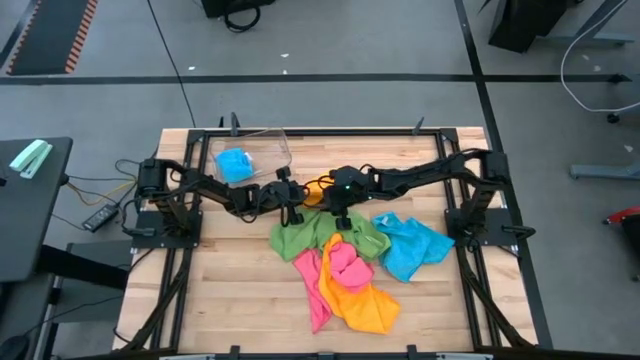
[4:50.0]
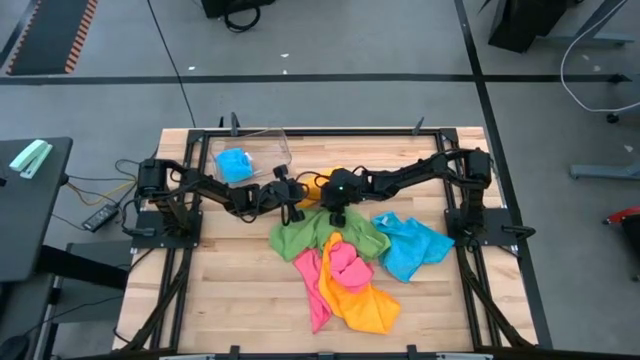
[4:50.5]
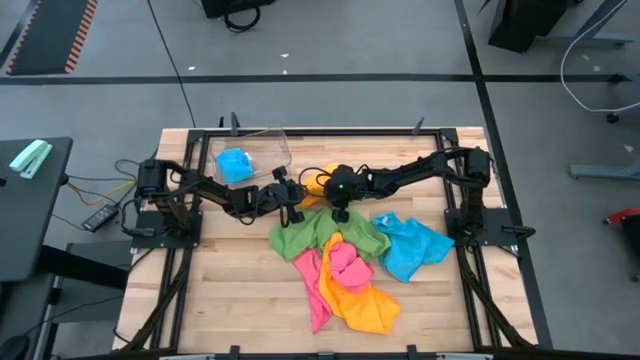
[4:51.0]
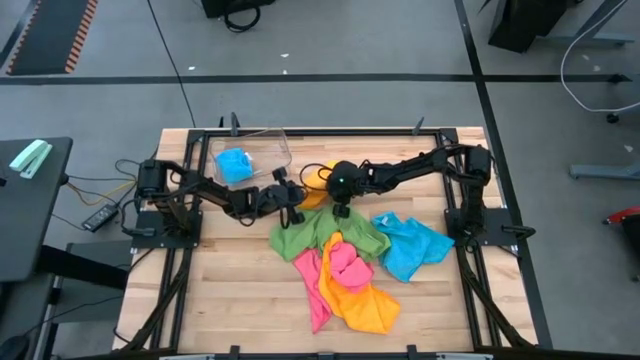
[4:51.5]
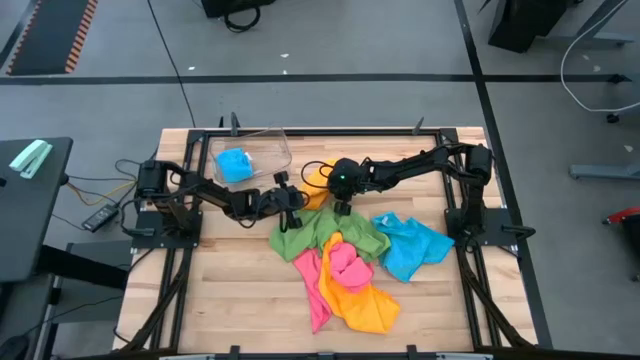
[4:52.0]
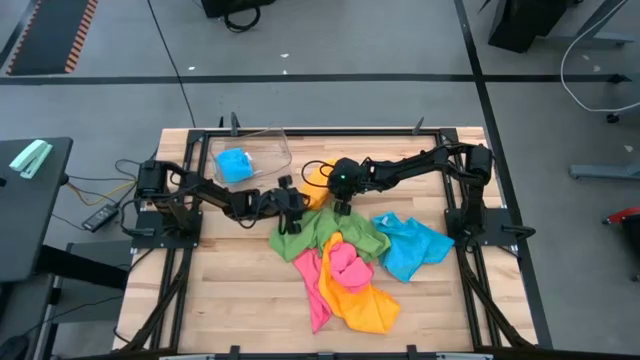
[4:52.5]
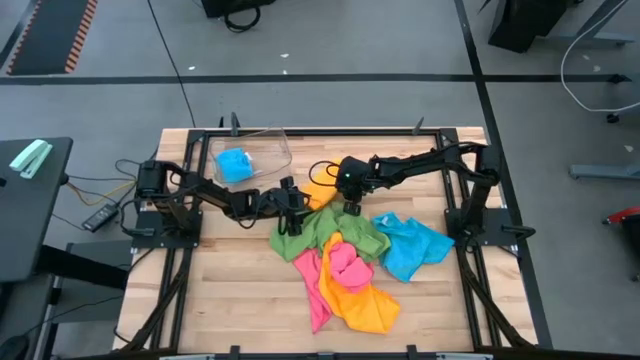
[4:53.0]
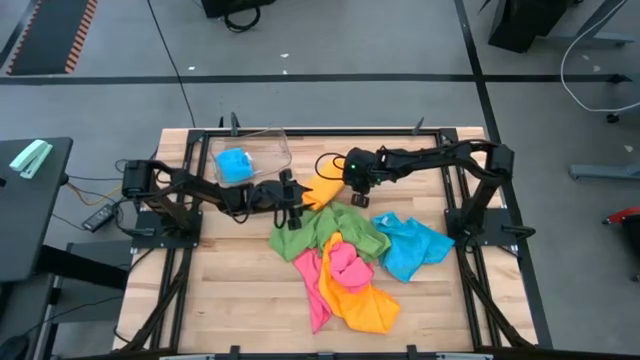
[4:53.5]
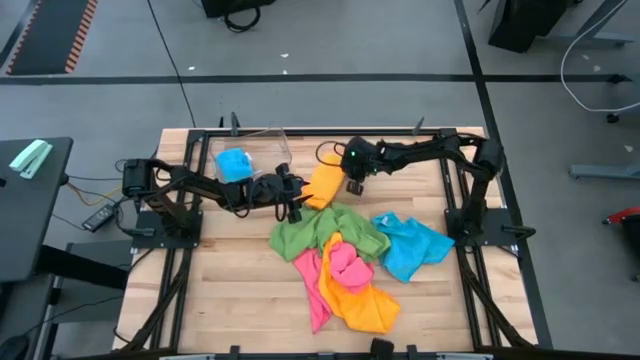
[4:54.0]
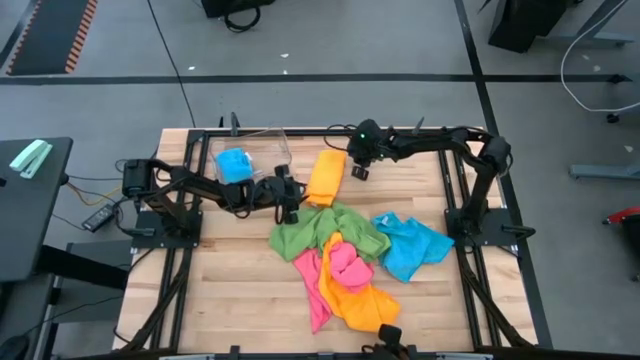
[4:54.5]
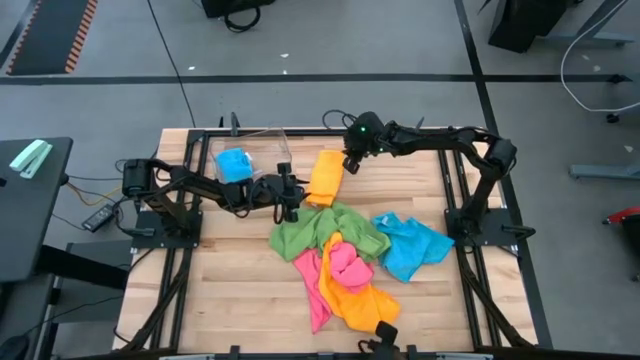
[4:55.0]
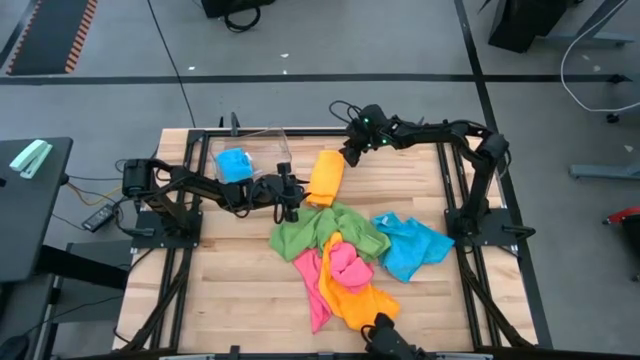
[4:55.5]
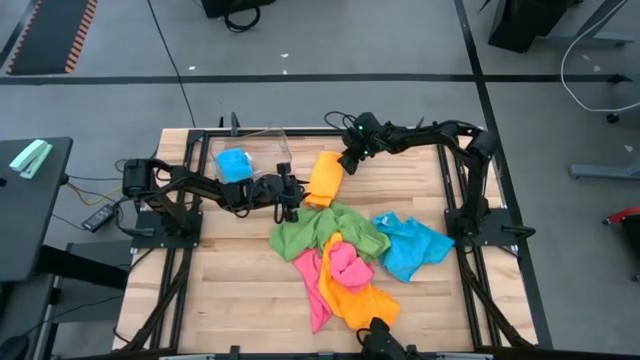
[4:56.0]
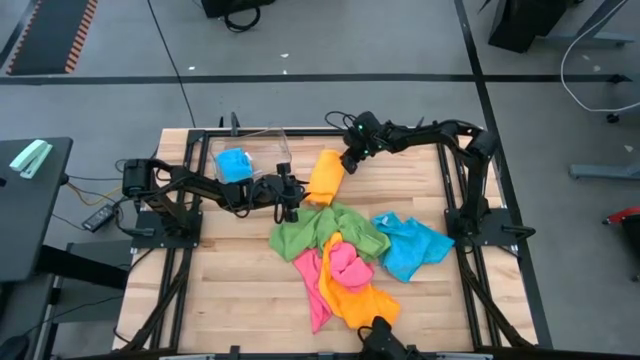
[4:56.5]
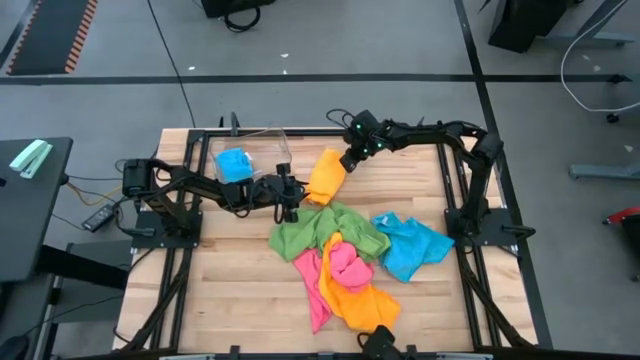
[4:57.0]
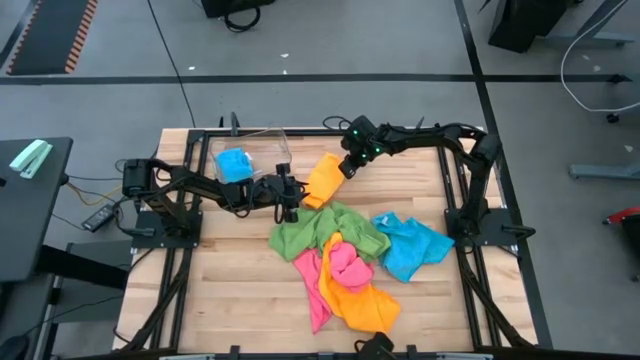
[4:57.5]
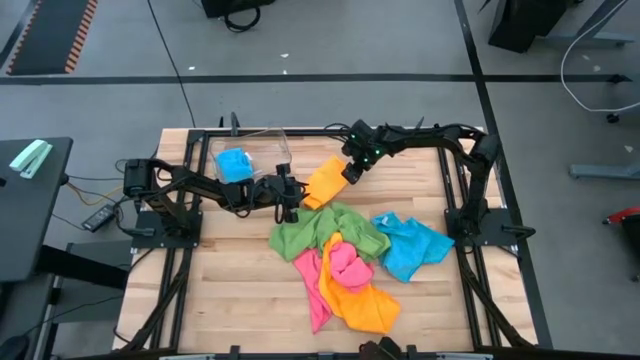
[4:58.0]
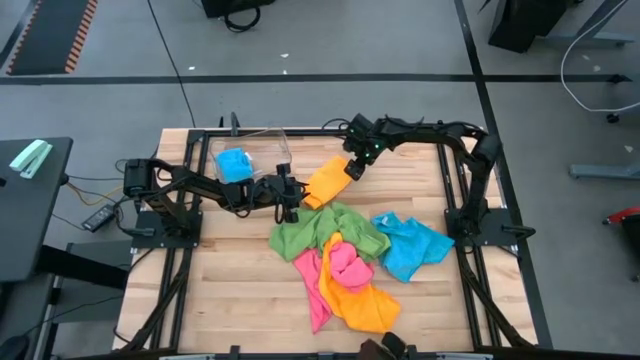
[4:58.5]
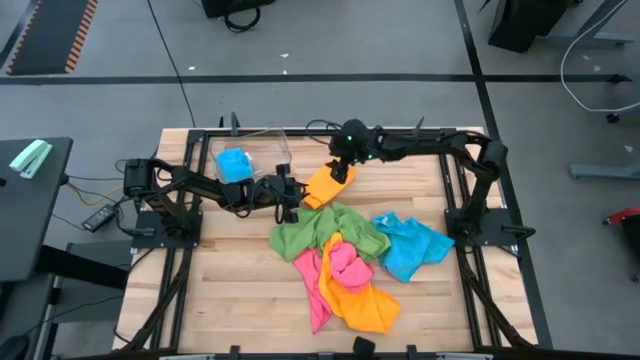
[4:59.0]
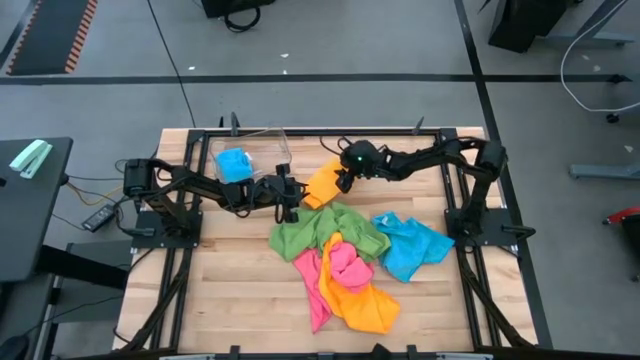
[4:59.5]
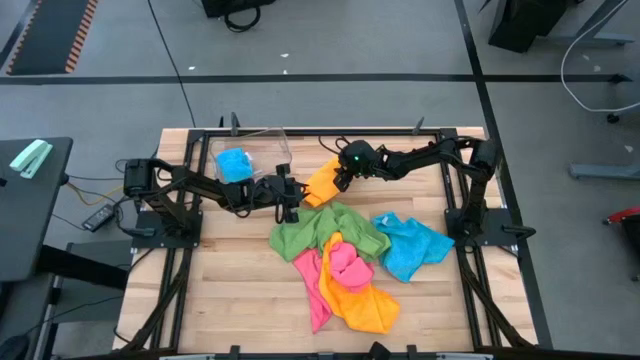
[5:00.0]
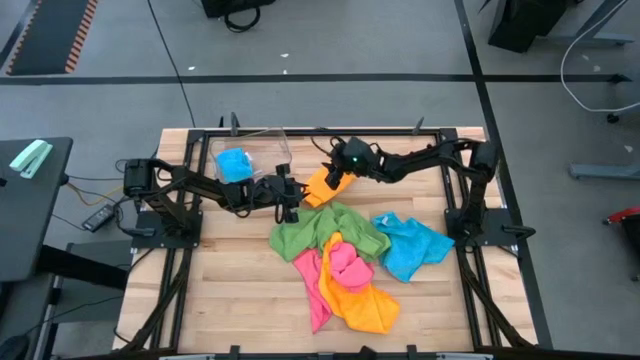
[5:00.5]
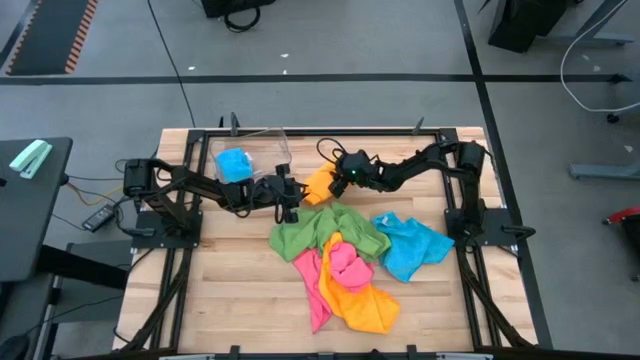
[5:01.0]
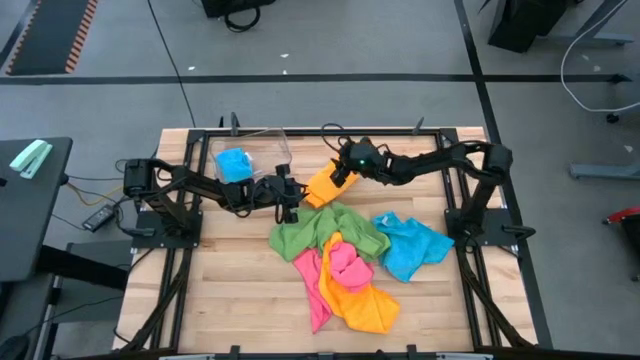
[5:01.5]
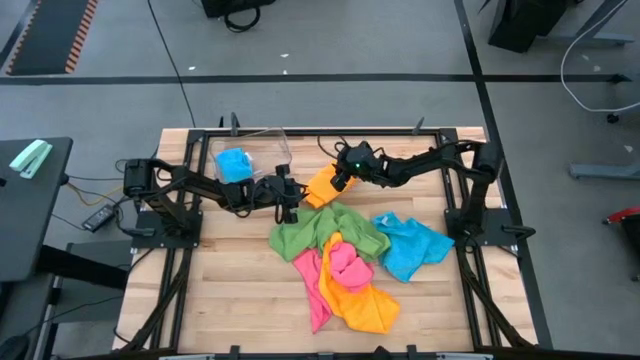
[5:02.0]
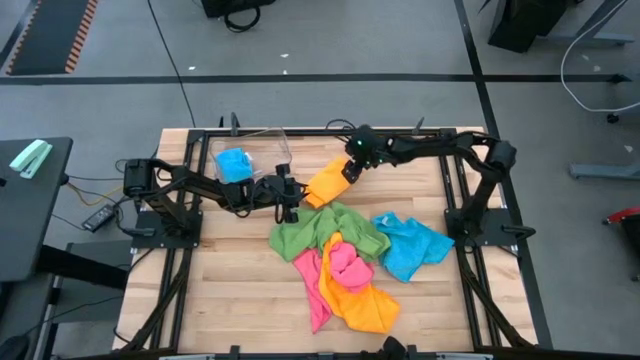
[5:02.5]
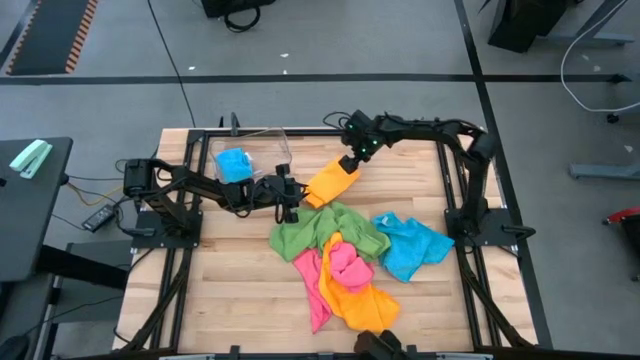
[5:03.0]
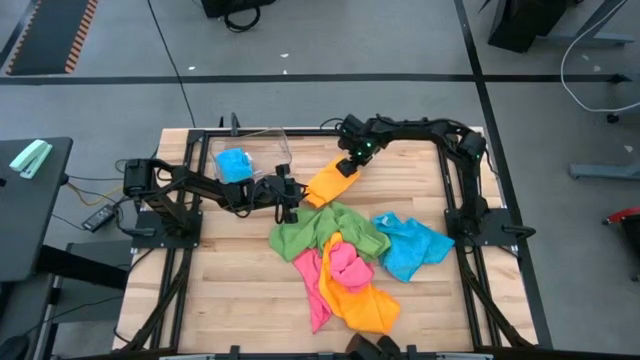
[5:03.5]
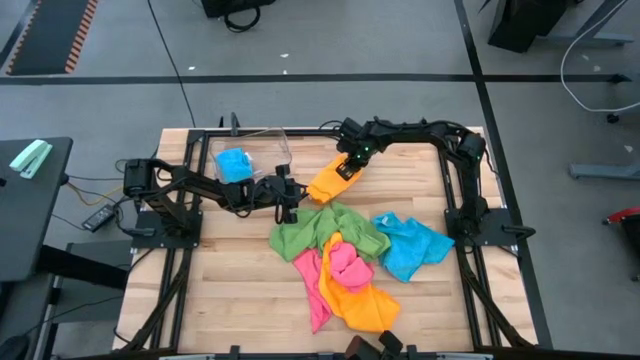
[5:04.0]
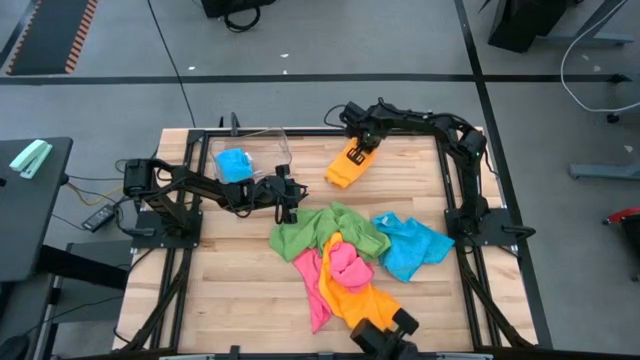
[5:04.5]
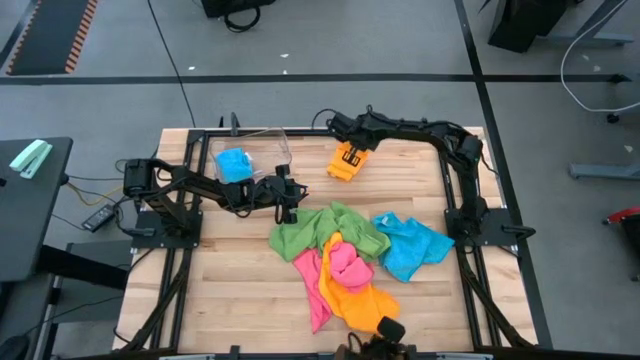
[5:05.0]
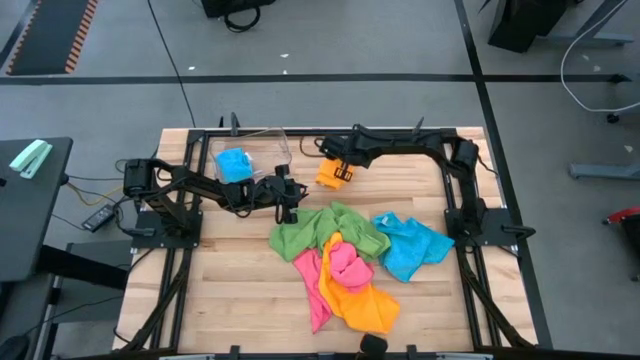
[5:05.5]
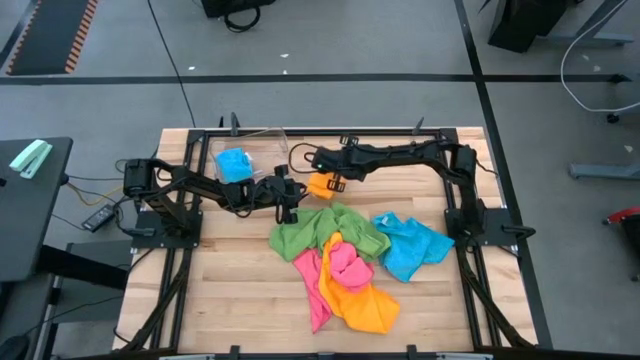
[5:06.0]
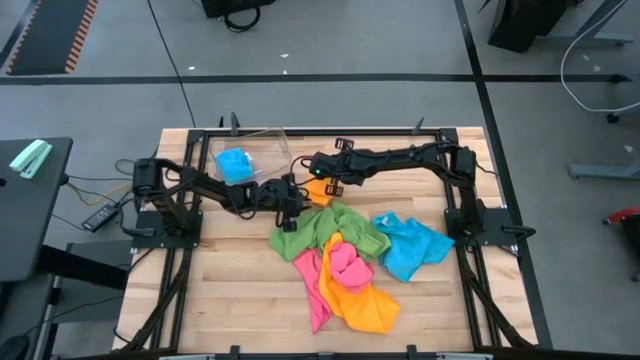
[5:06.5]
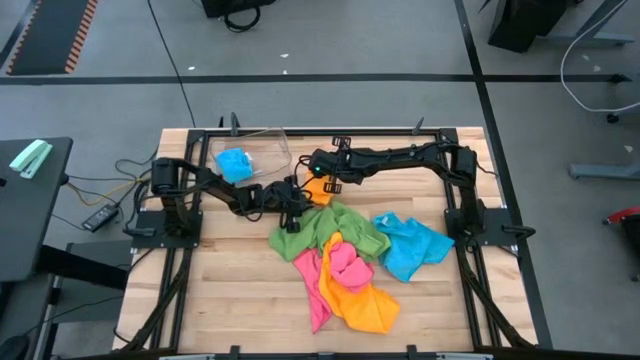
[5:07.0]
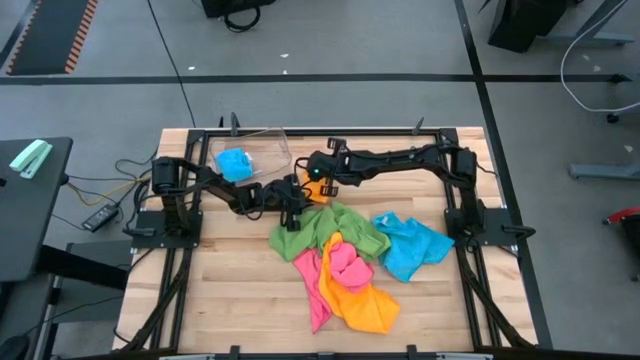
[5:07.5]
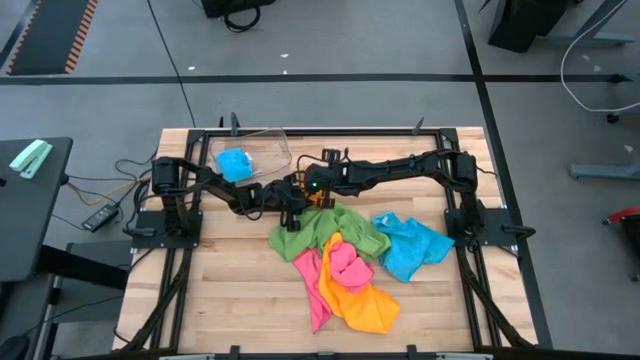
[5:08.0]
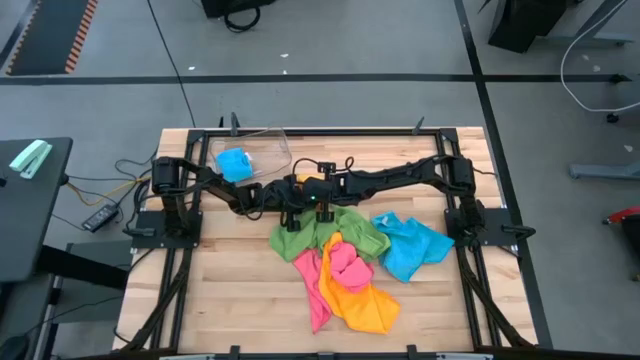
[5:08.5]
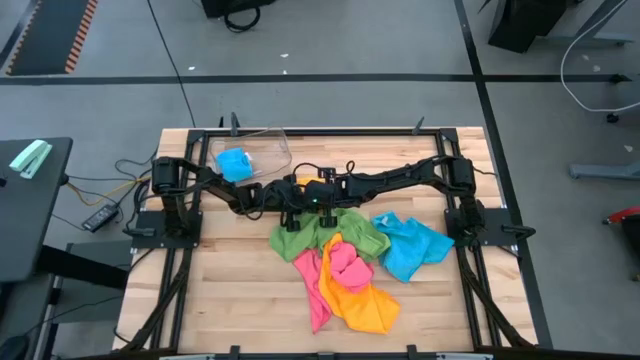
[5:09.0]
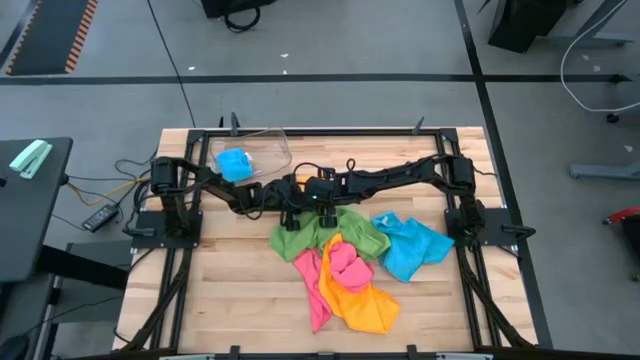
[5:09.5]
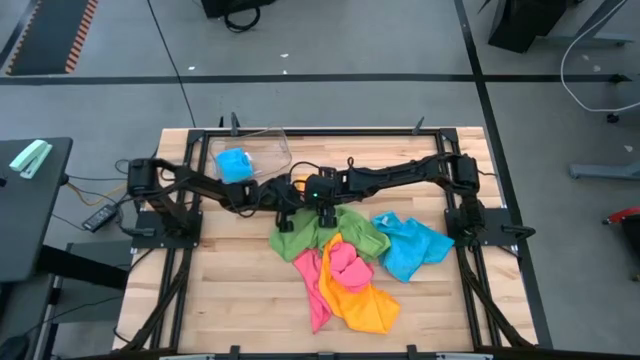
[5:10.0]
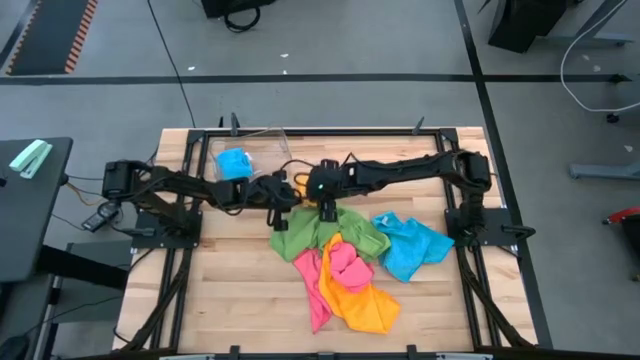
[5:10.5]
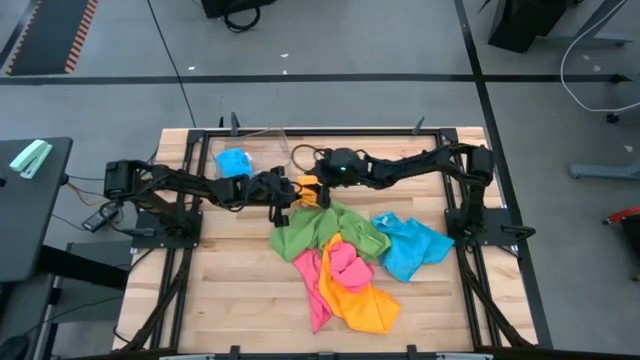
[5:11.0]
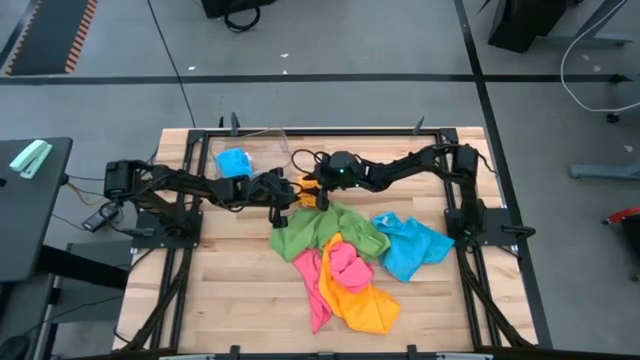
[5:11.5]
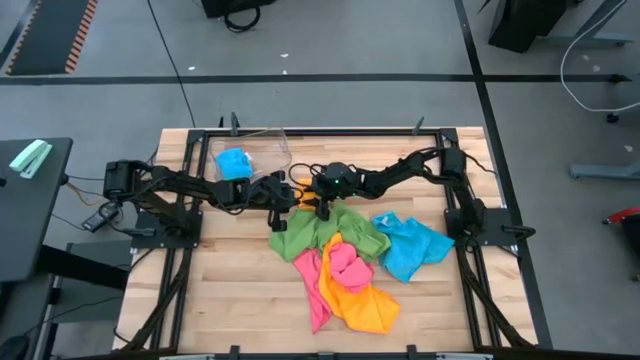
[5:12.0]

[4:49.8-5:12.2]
Task: Fold microfiber towels
Fold the top orange microfiber towel
